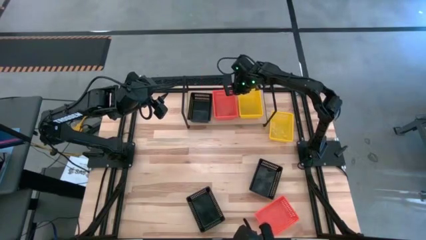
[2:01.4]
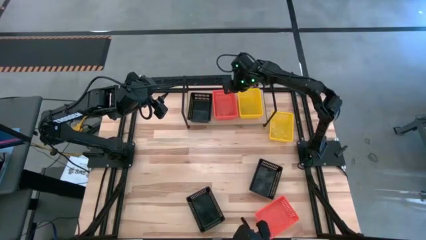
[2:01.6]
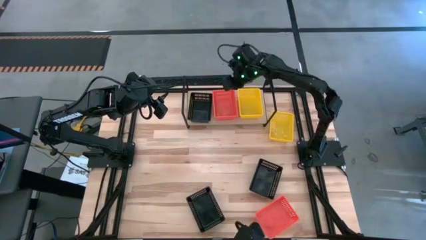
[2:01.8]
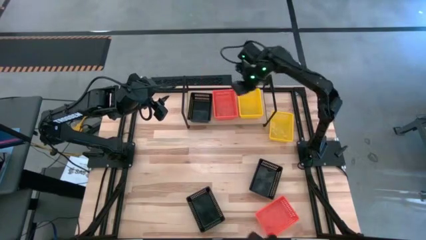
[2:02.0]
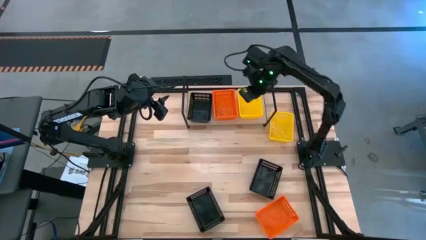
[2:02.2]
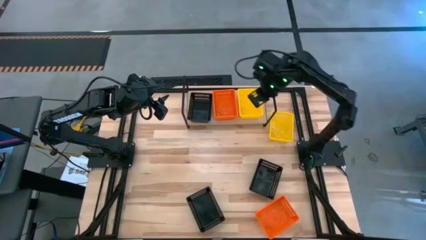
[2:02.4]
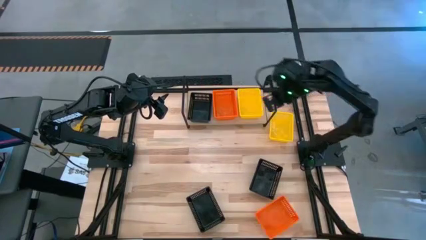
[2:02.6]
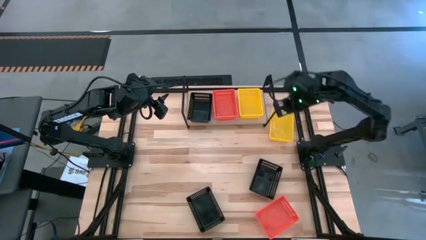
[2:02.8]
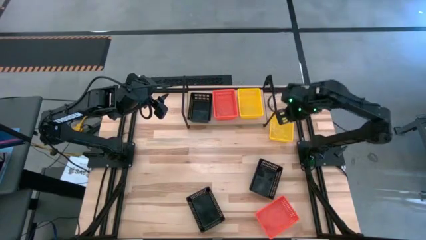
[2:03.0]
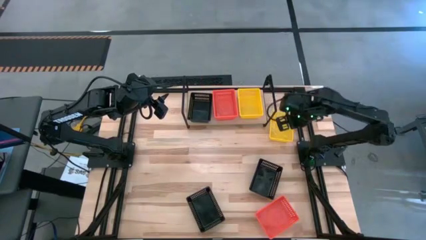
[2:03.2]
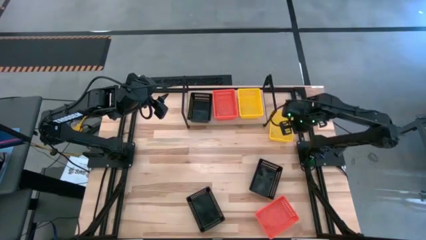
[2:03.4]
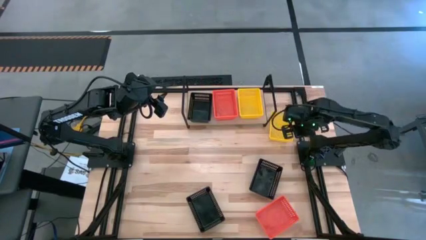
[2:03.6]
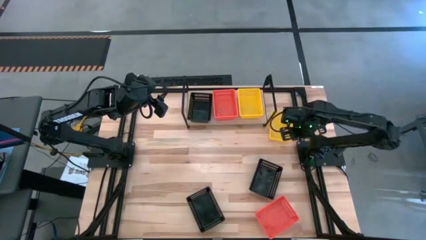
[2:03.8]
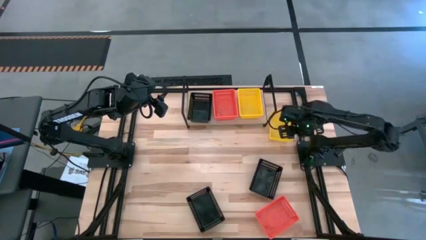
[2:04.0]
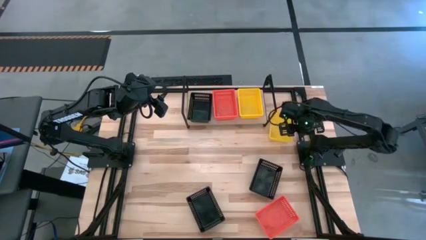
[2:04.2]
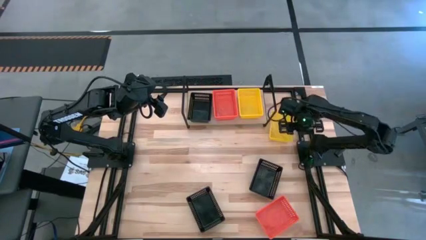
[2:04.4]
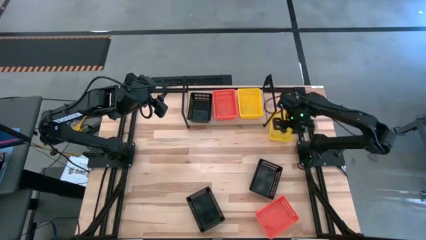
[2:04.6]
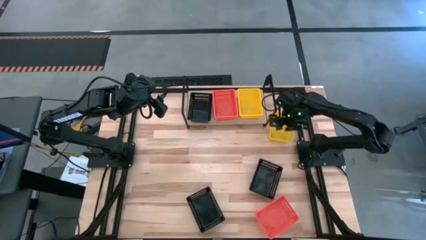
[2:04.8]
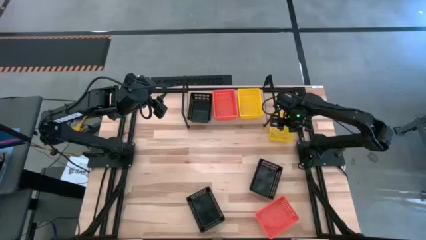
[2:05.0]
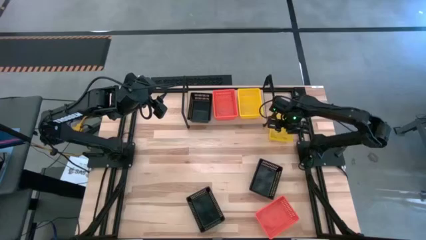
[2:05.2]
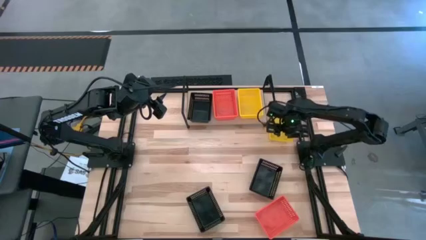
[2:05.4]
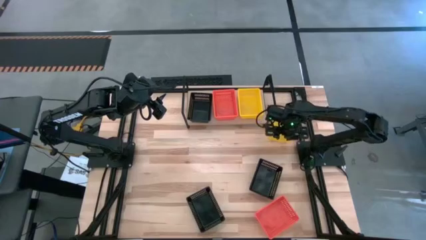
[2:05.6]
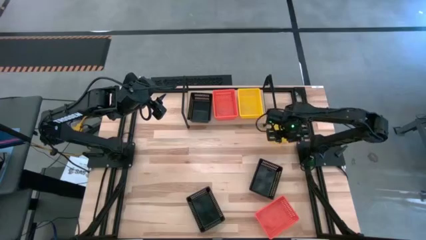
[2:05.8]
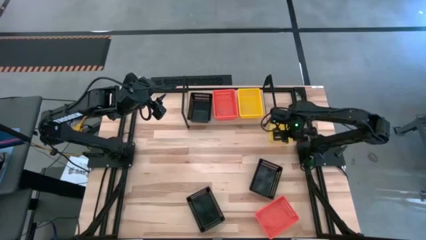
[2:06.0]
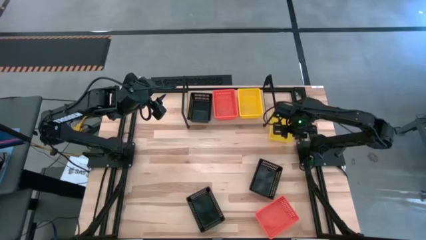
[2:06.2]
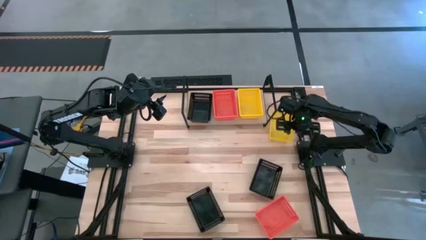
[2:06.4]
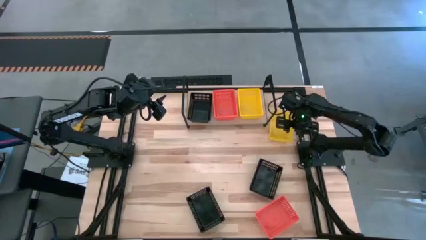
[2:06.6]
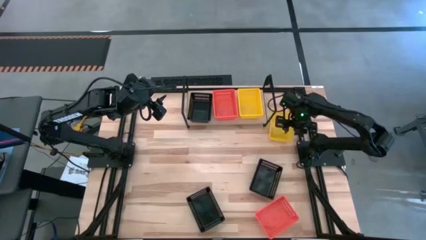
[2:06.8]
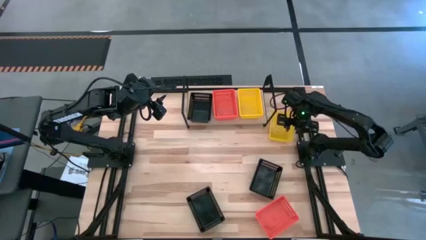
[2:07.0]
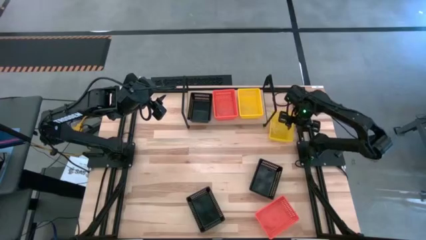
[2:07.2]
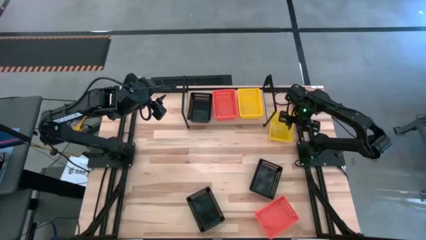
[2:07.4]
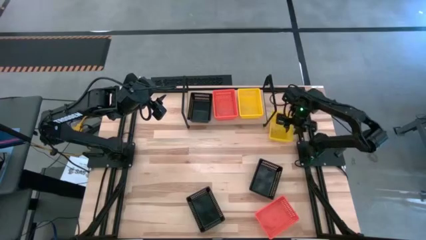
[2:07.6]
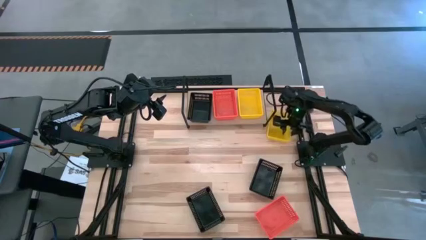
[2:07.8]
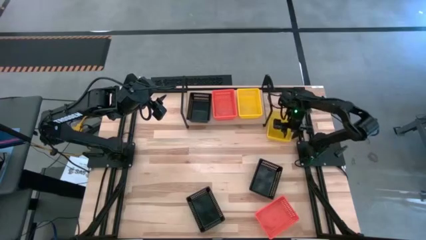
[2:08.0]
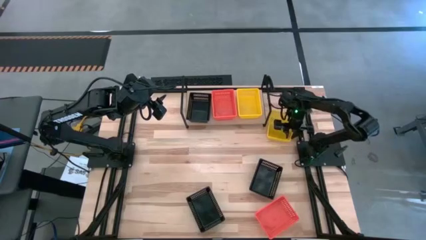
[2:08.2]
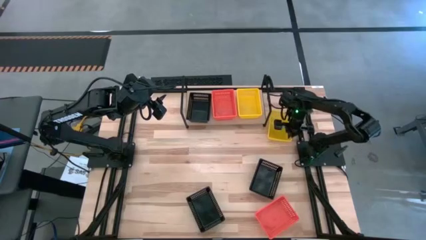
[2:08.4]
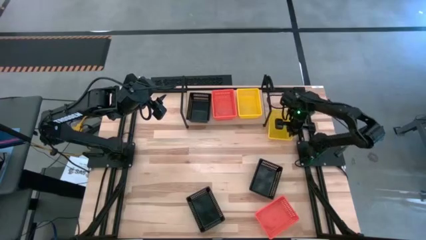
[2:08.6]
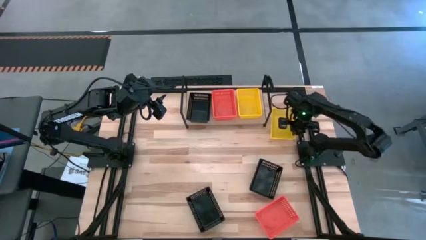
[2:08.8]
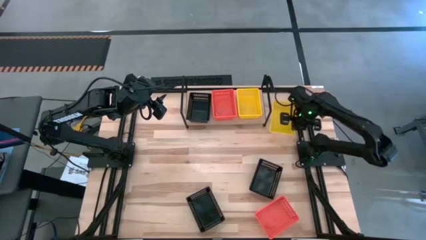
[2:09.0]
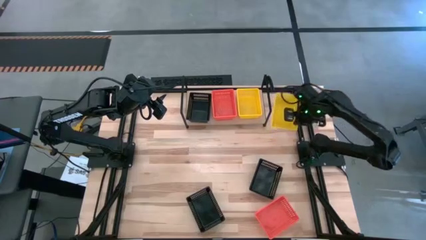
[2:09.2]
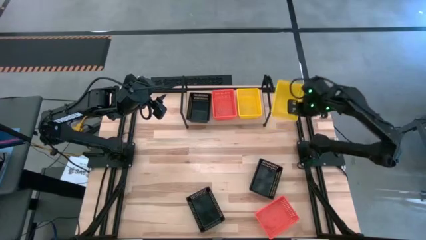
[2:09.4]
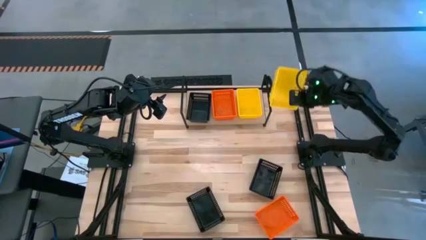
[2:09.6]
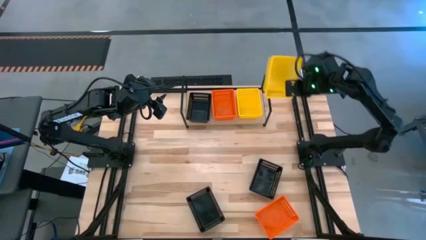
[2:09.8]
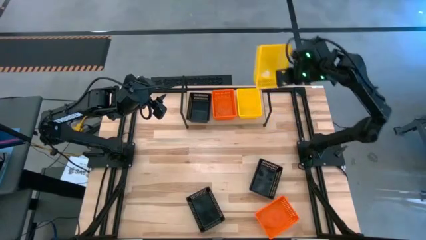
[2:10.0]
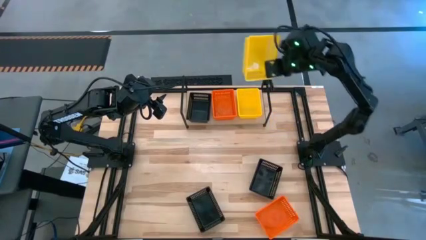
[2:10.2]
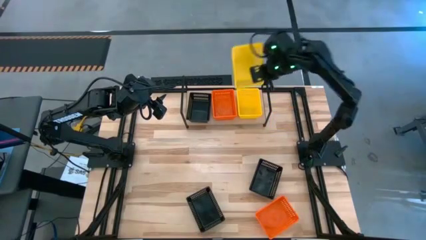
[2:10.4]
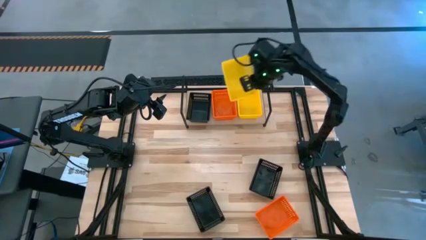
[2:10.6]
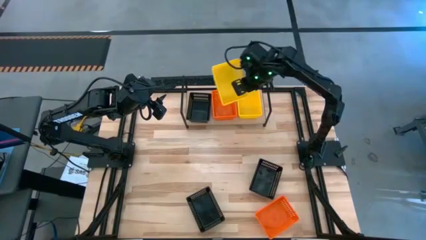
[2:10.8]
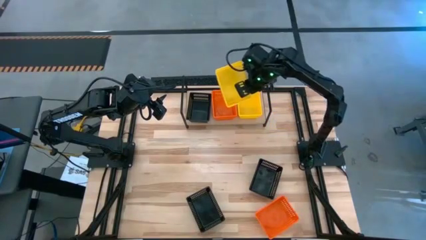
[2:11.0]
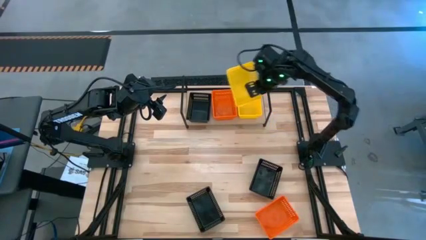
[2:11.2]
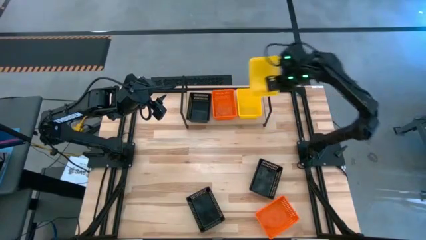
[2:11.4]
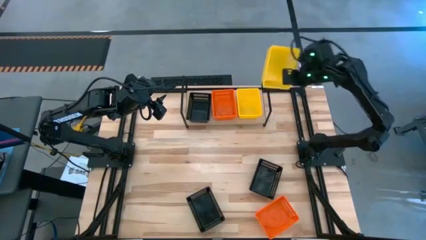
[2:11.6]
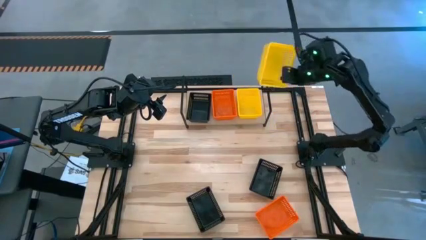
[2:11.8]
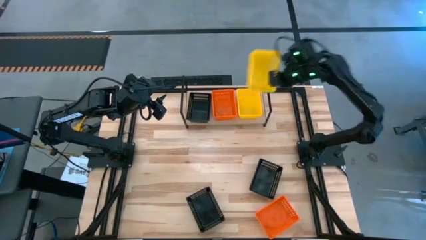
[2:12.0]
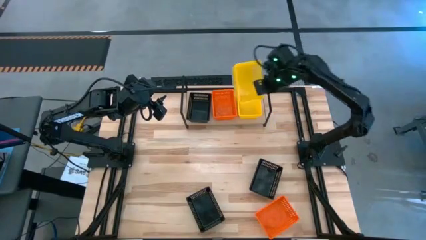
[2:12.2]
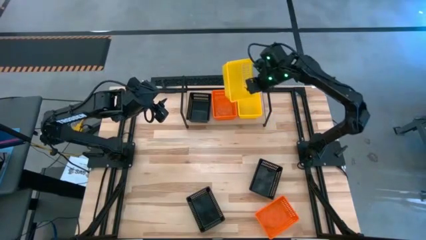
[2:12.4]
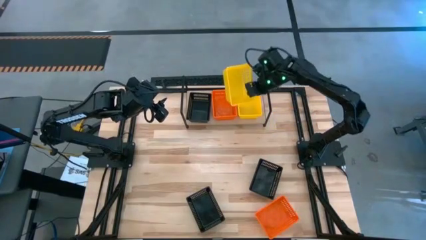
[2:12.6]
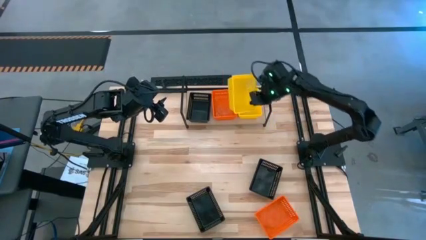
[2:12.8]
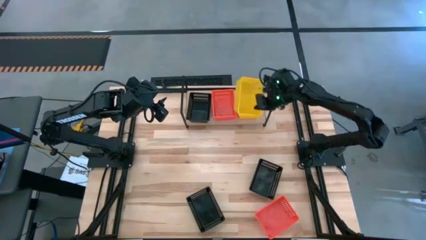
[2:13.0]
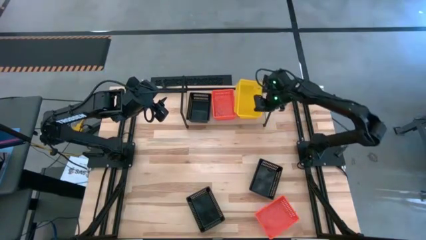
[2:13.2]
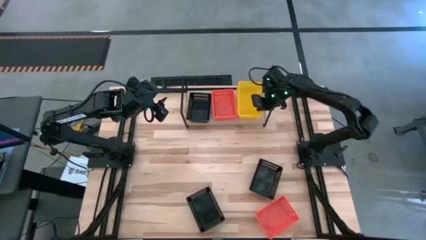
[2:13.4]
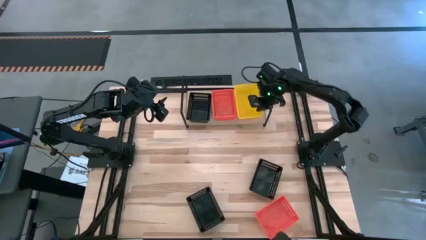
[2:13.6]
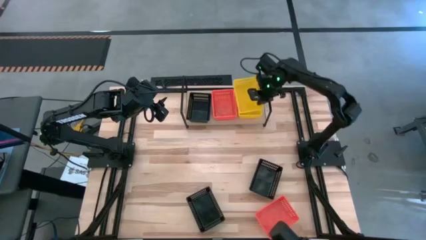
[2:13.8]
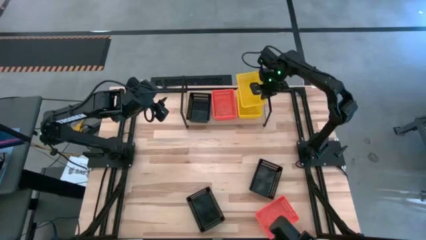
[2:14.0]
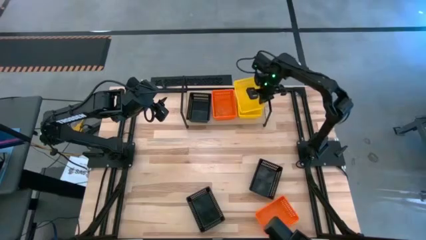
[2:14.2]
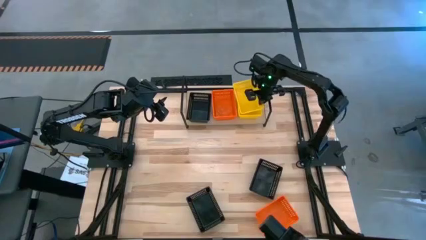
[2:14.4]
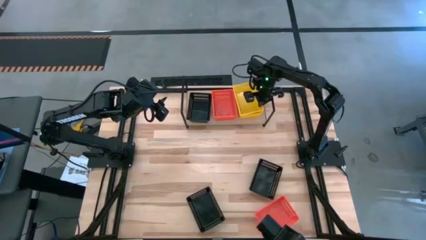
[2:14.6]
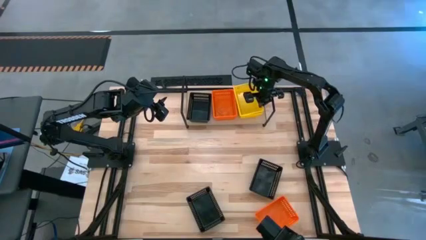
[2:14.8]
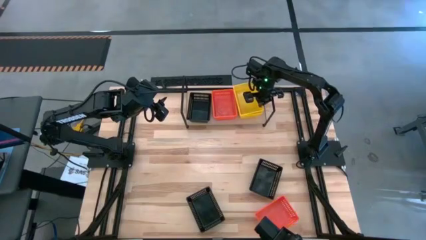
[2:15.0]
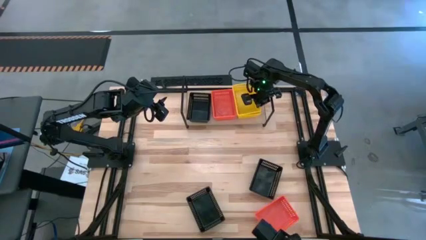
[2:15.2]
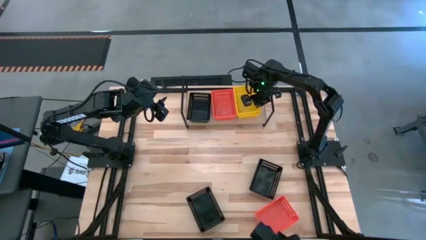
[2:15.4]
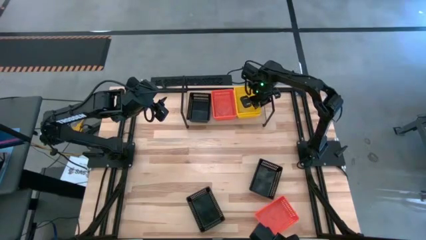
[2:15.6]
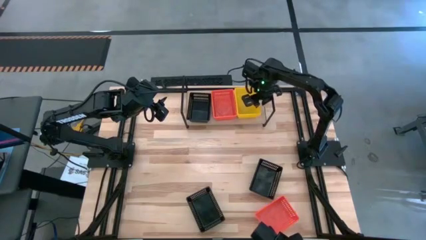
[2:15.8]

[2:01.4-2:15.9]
Task: Stack baskets on shelf by color
Stack the yellow bin on top of the other yellow bin on the shelf
